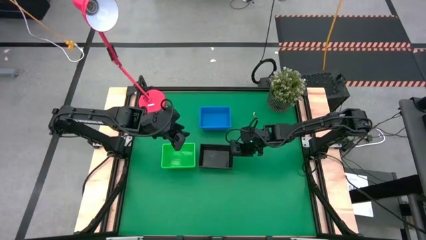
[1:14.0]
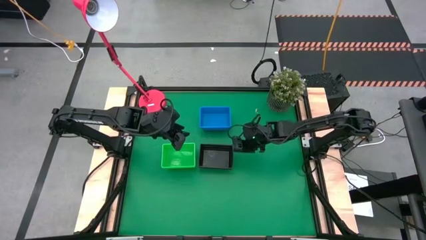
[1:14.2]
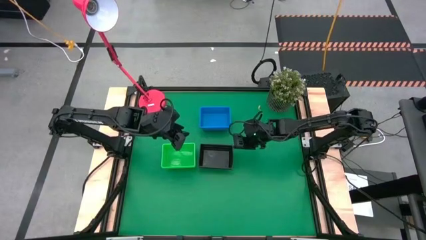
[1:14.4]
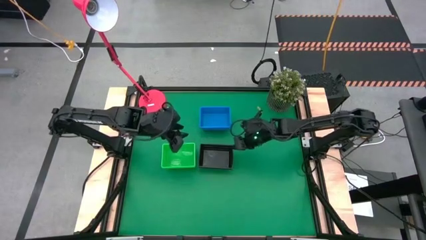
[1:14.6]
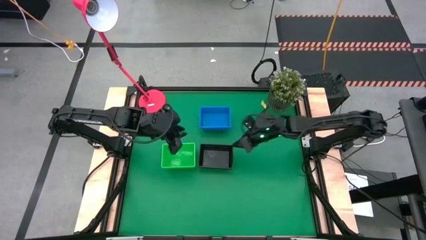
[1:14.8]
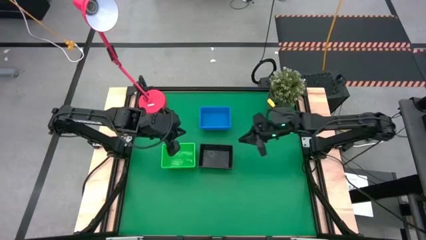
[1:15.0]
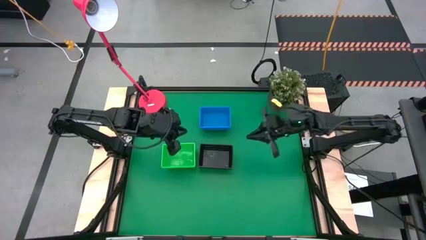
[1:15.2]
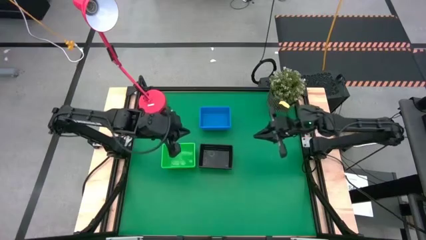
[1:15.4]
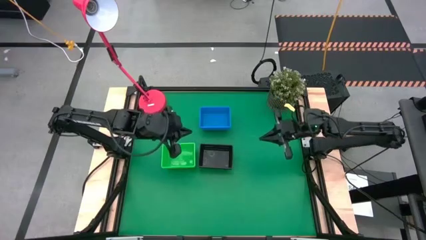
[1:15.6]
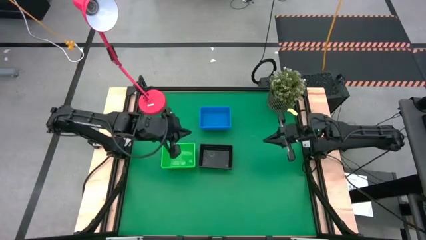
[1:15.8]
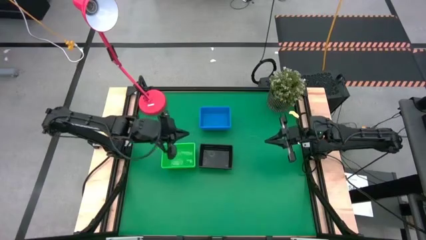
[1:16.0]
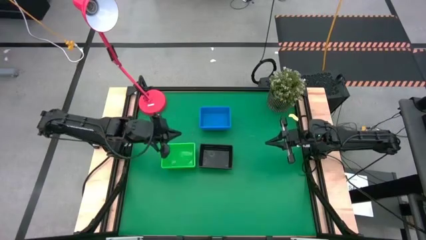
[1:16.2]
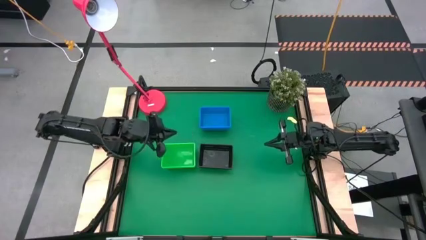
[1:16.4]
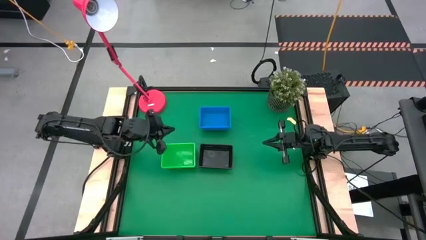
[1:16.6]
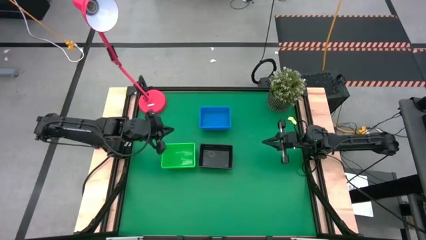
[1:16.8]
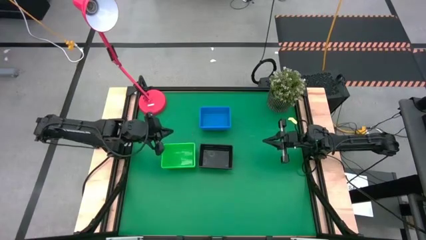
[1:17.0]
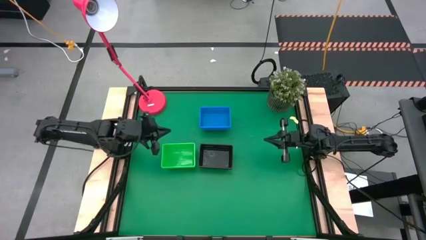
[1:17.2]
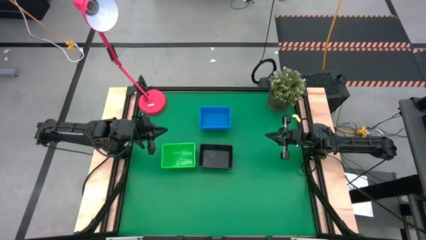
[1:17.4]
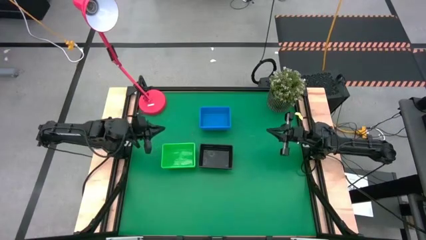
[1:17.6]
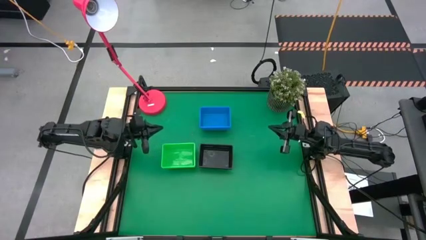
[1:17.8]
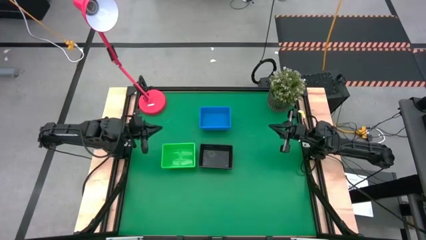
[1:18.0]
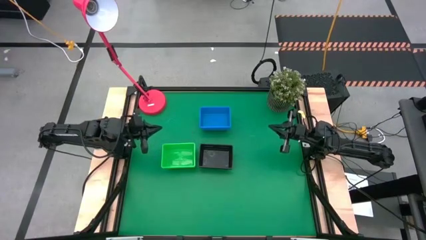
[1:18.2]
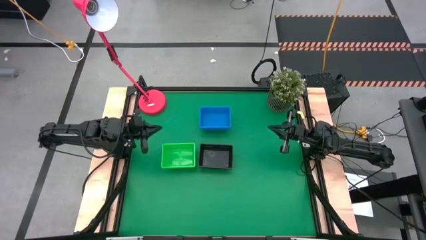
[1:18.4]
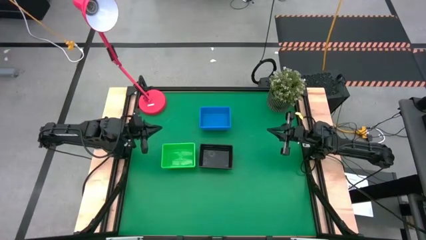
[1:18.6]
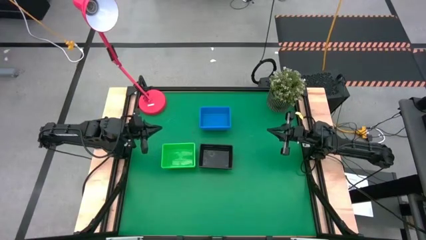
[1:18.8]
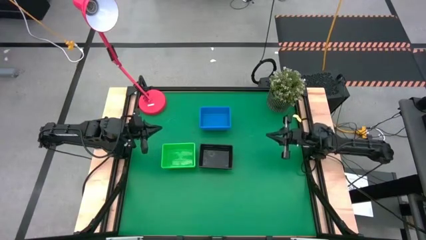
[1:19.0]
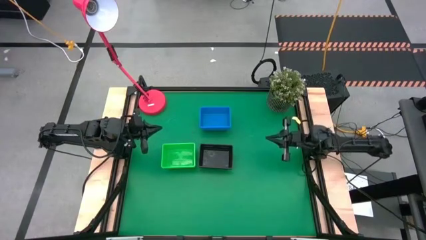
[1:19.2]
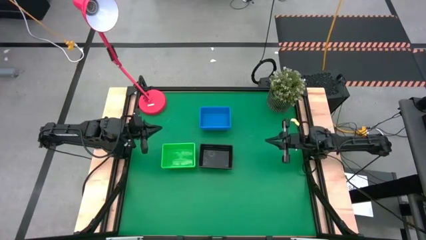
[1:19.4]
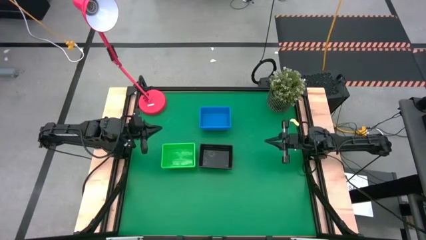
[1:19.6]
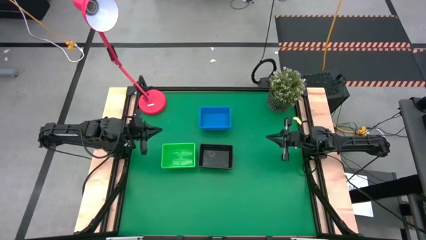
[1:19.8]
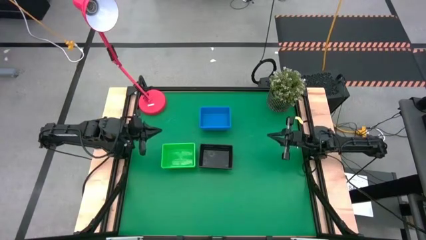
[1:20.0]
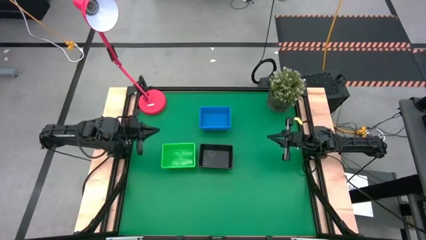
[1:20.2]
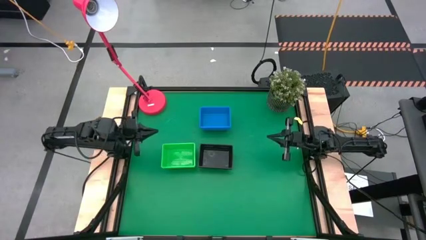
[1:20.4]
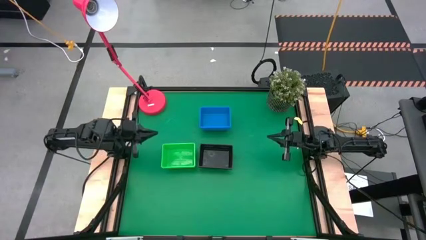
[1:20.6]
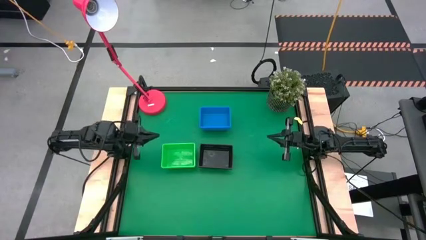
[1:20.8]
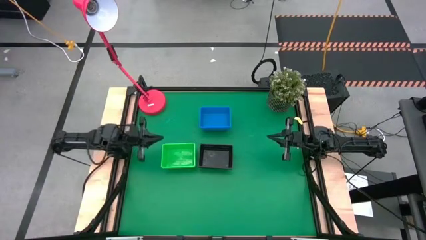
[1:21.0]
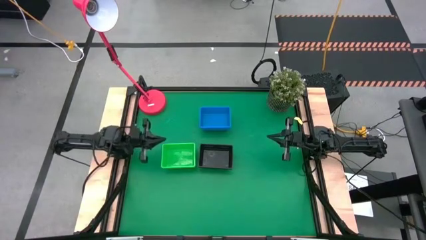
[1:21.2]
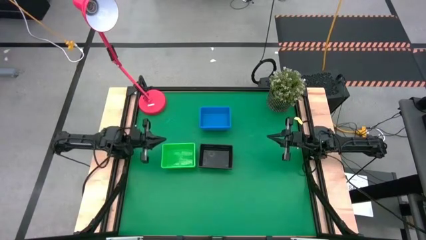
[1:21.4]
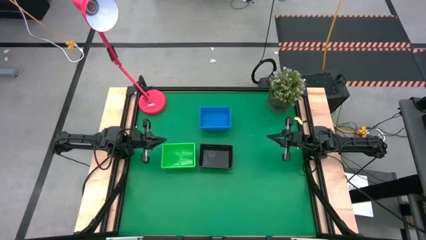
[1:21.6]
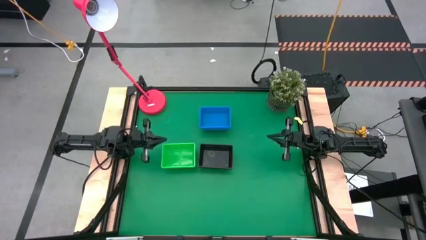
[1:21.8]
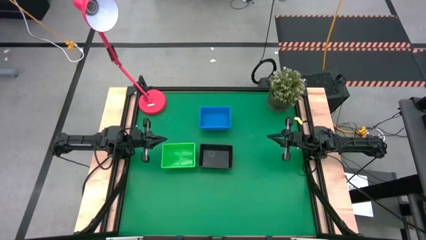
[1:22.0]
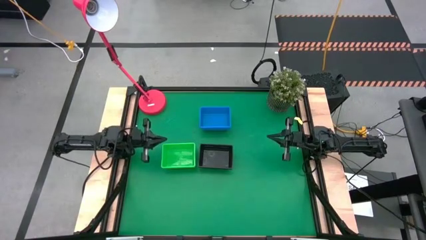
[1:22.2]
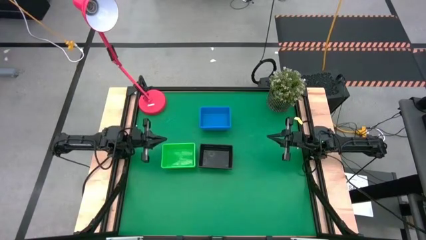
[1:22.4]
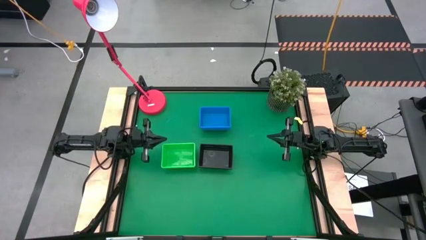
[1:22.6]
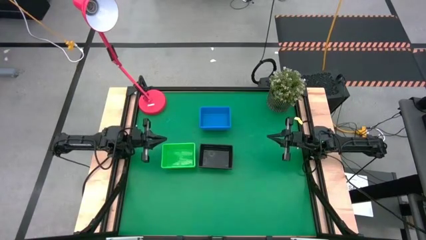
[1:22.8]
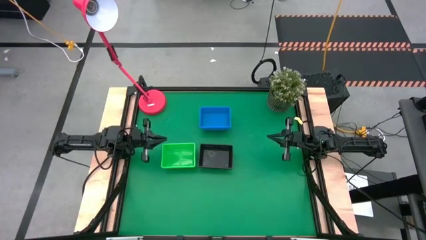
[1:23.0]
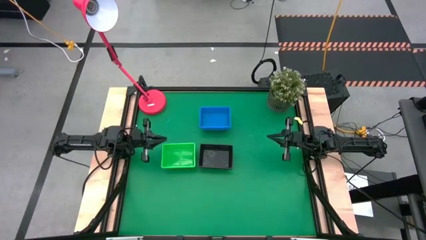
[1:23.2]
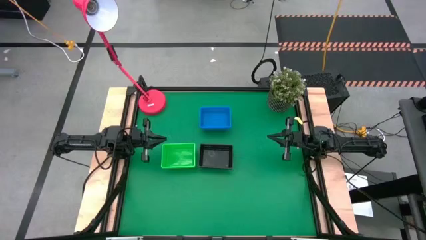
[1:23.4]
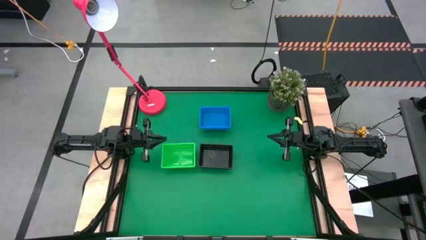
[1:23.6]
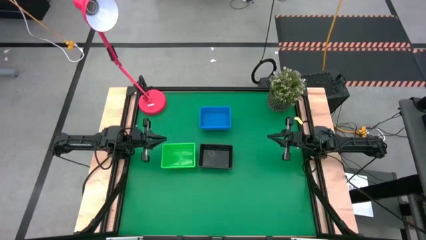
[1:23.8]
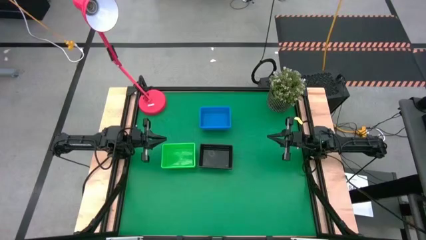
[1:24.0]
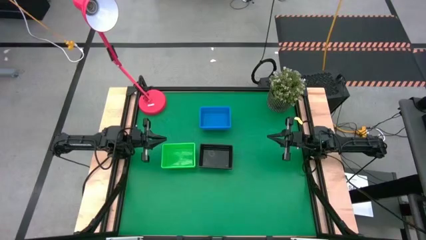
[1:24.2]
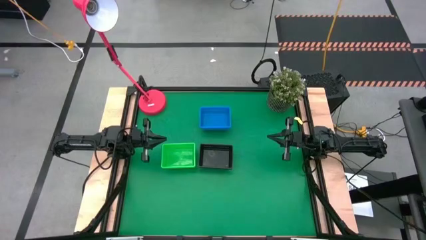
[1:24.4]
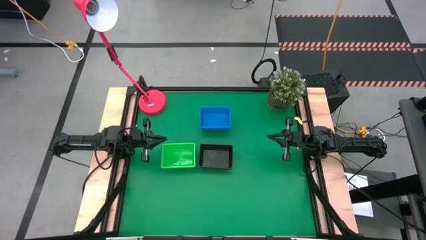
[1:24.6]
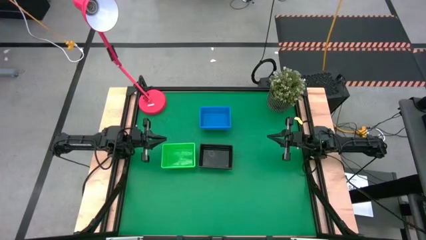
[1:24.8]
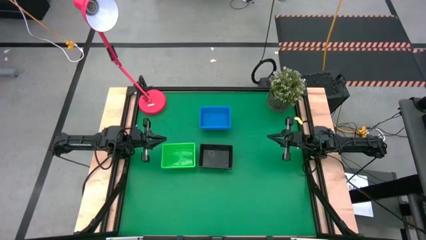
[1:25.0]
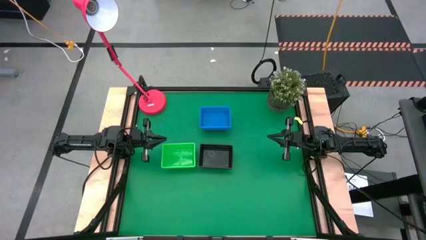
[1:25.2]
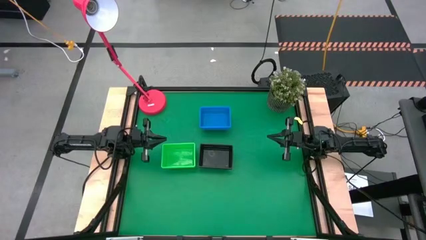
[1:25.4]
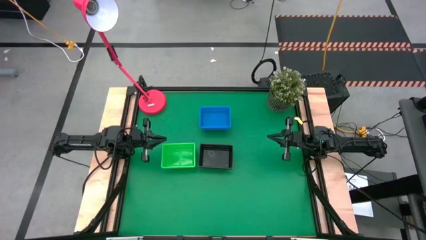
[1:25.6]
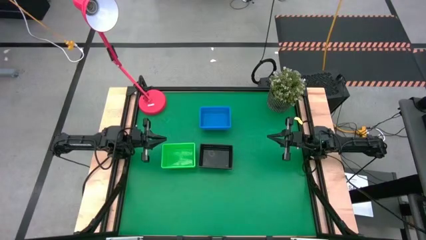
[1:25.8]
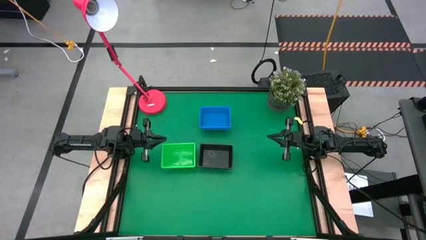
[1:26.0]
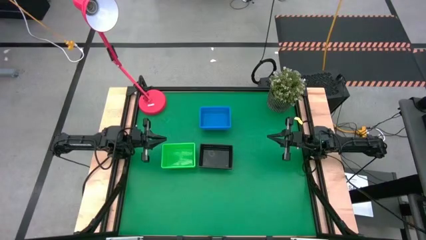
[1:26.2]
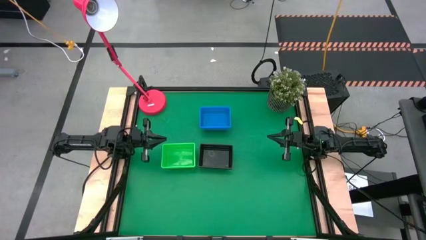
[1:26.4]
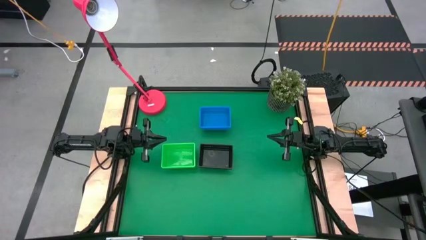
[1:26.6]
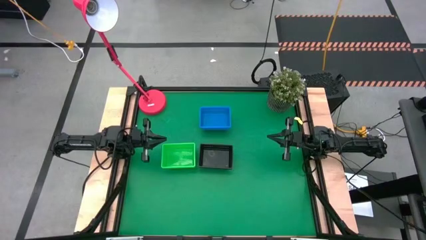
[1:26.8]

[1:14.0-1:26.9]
Return to Home Position
